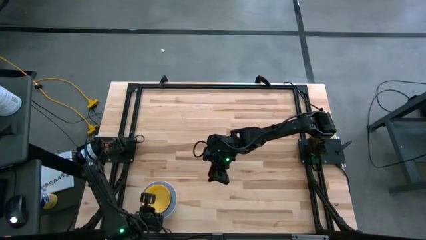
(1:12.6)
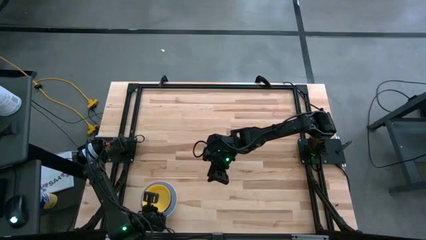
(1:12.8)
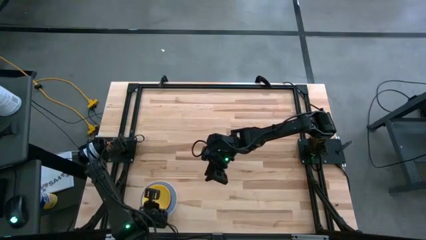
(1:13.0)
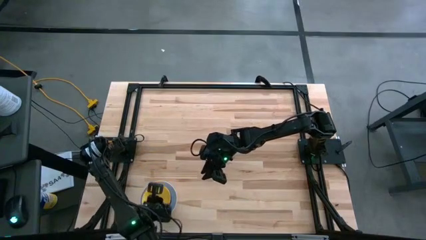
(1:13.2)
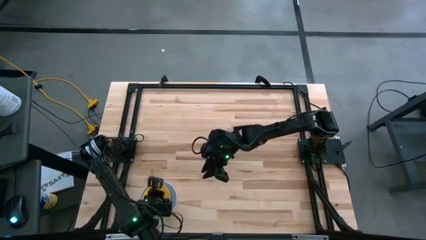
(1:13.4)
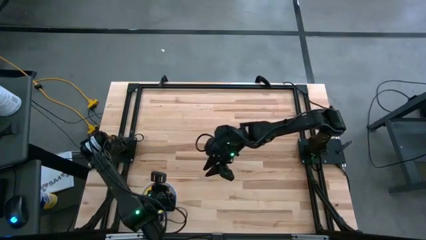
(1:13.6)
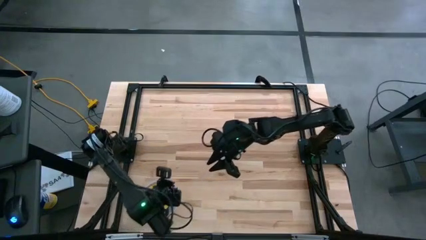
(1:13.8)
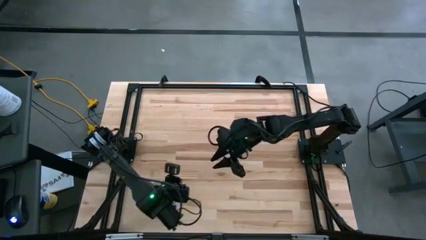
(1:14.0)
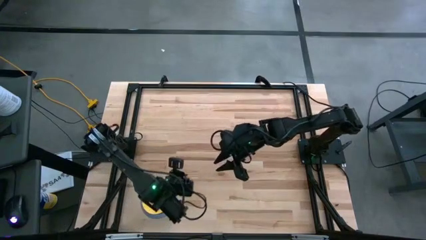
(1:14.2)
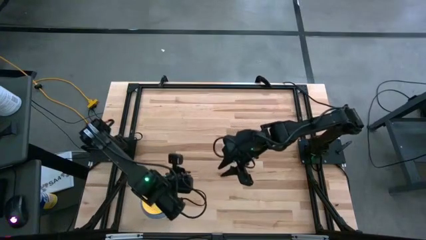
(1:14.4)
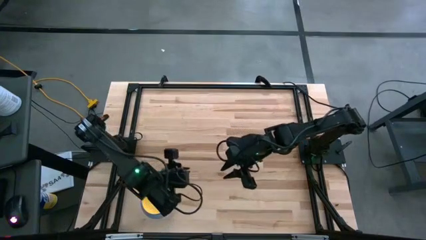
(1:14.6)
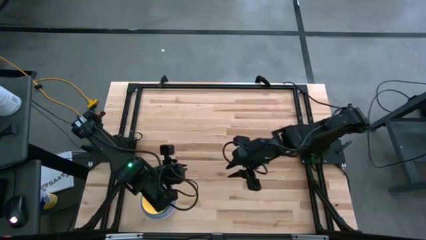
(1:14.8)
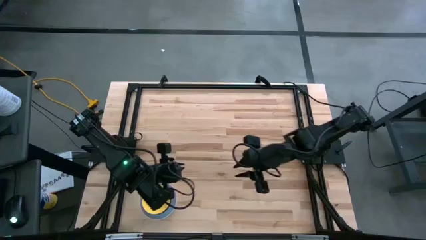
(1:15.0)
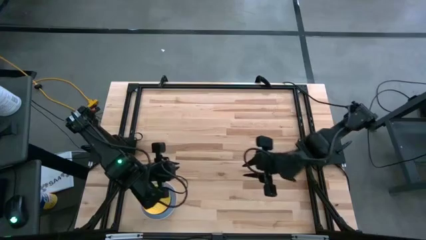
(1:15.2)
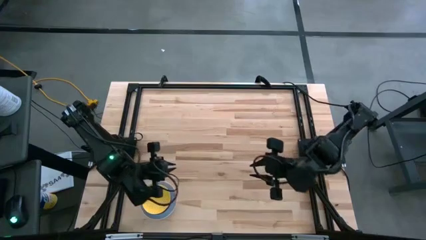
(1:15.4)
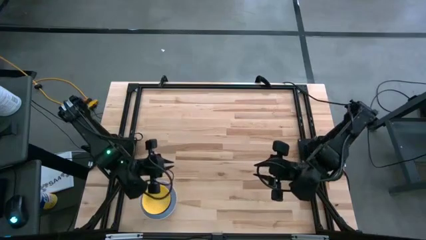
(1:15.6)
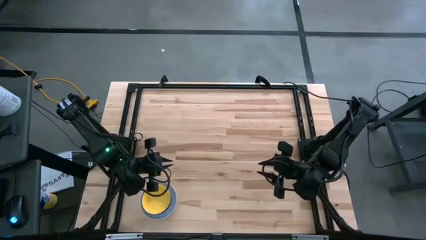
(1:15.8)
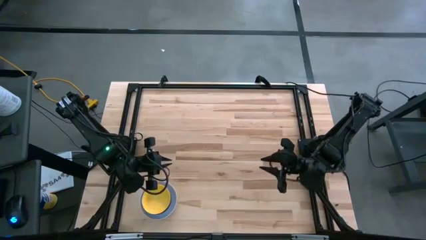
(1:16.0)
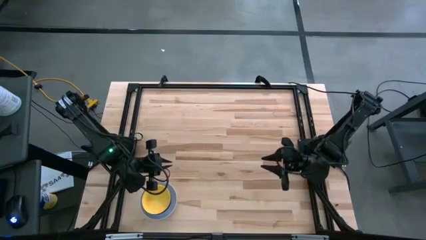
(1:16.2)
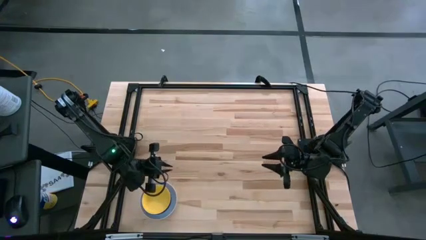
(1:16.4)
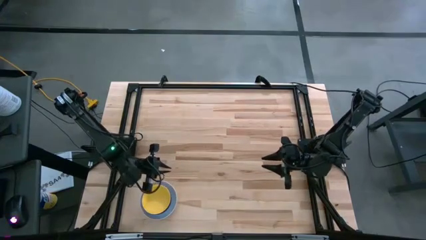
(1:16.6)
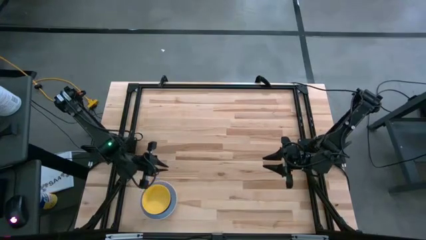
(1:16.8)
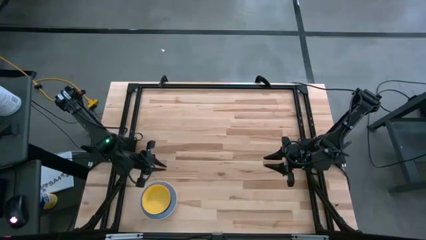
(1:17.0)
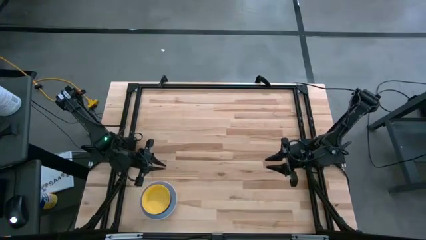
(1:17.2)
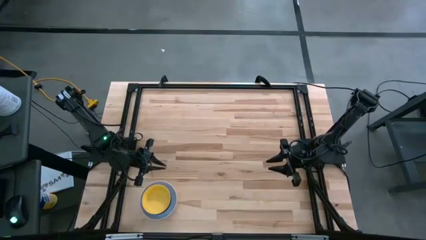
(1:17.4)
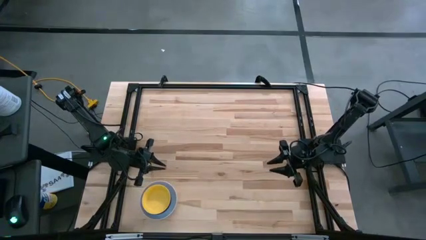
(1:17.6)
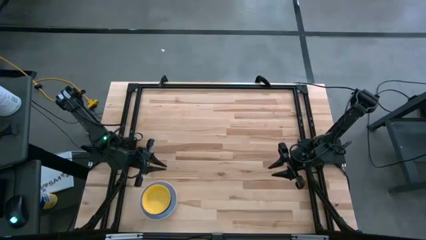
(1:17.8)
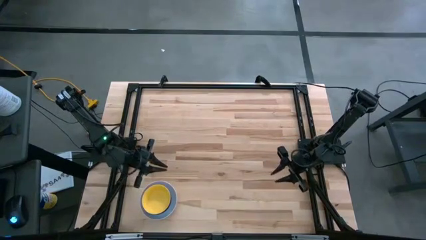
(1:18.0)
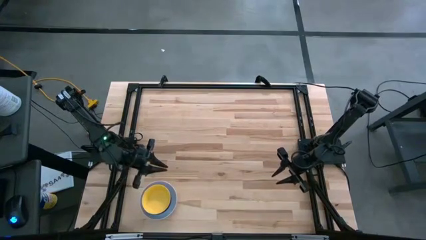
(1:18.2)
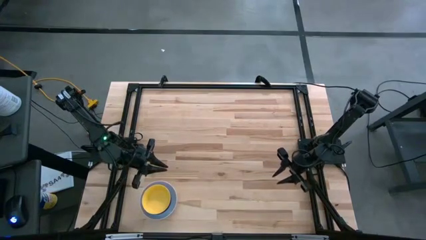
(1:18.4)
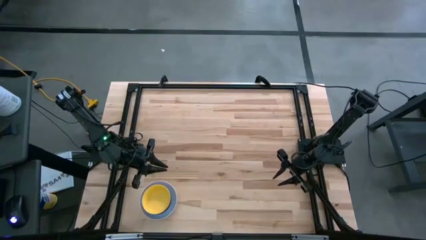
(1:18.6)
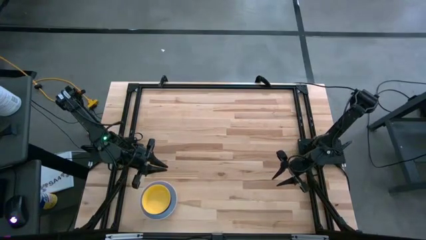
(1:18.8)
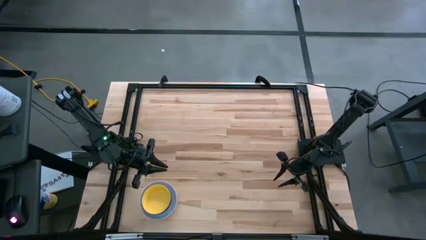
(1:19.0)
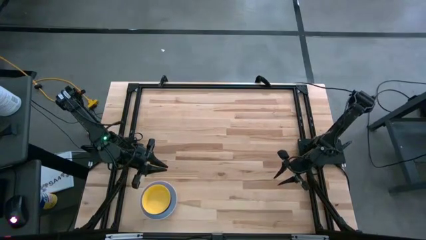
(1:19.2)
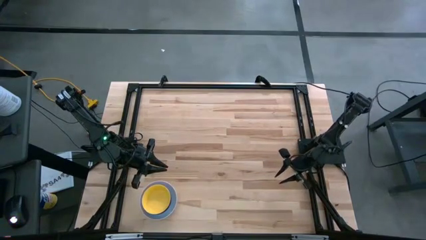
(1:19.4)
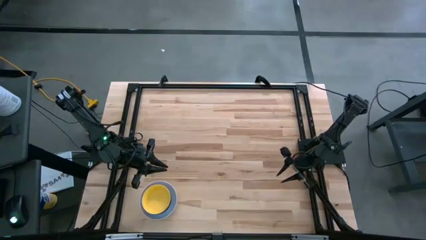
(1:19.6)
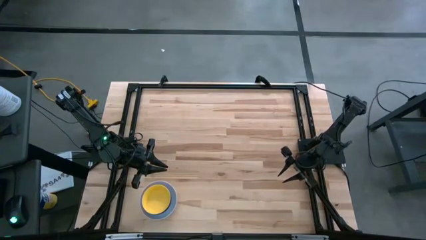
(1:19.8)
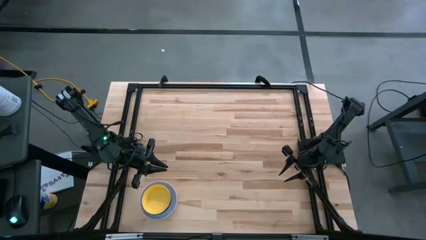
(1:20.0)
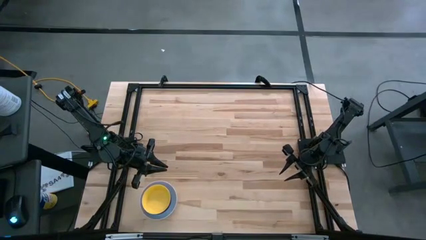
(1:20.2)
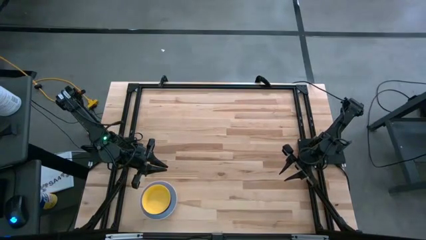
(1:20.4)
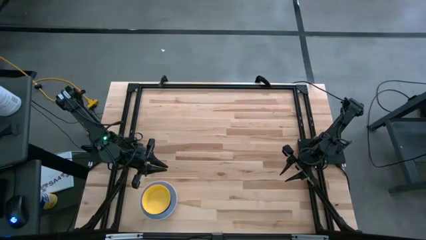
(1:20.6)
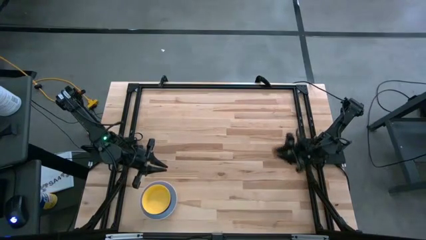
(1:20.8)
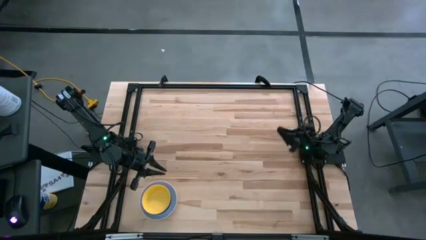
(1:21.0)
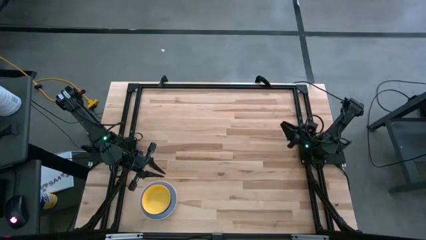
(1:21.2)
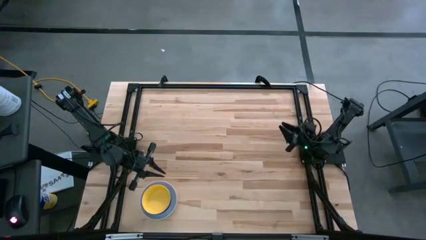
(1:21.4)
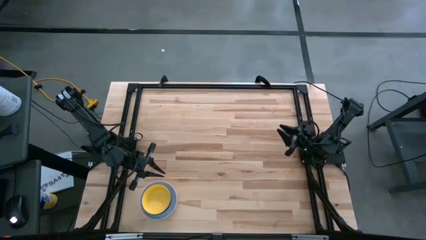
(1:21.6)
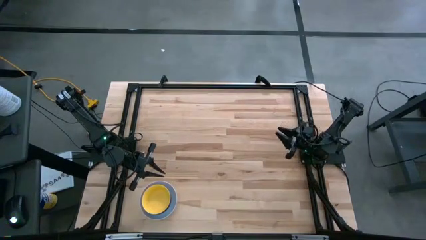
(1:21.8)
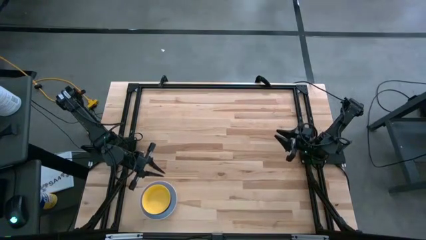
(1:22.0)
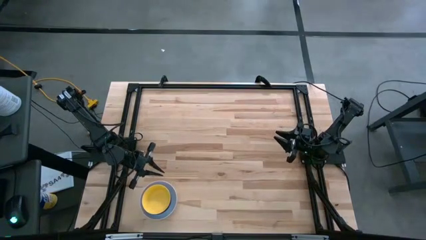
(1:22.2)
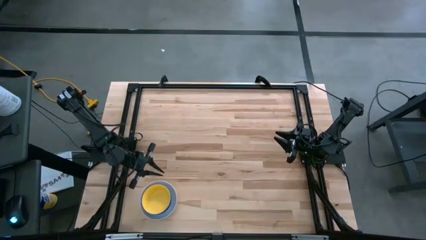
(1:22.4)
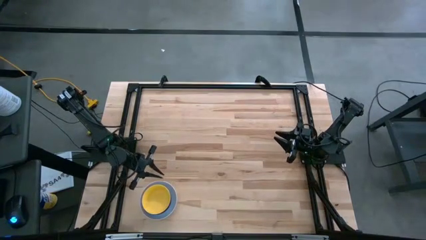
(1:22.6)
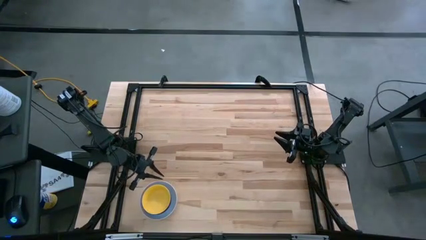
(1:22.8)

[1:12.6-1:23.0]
Return to Home Position
